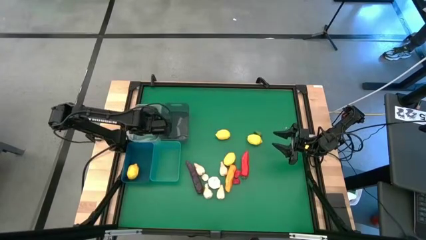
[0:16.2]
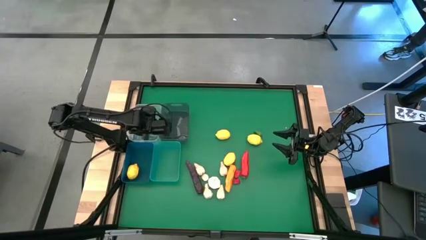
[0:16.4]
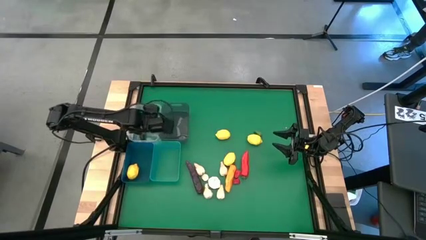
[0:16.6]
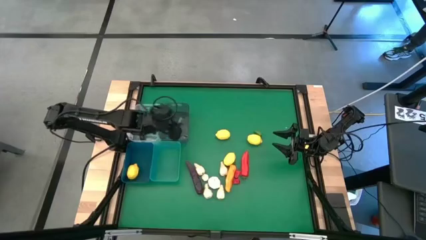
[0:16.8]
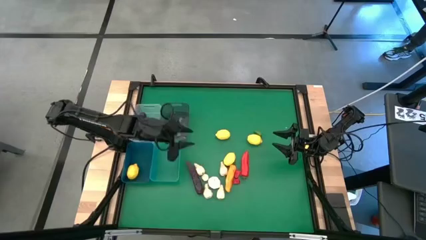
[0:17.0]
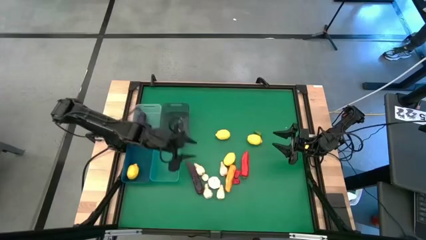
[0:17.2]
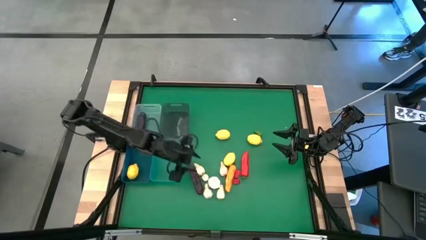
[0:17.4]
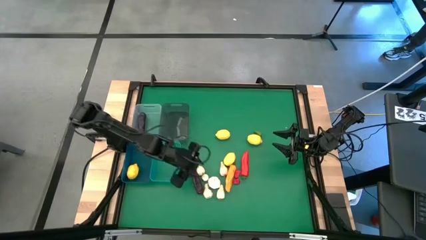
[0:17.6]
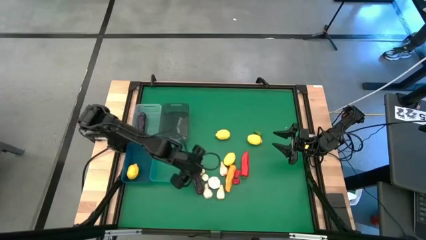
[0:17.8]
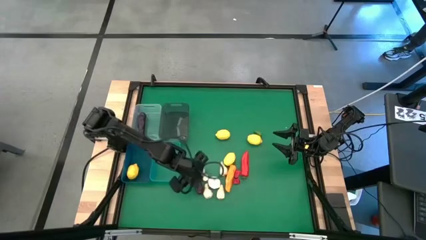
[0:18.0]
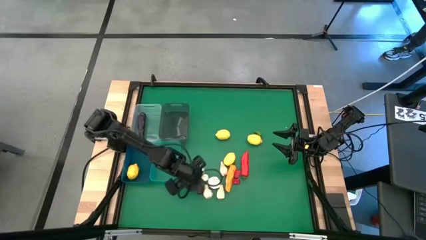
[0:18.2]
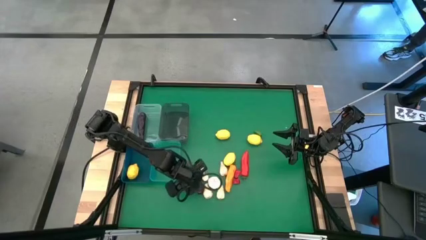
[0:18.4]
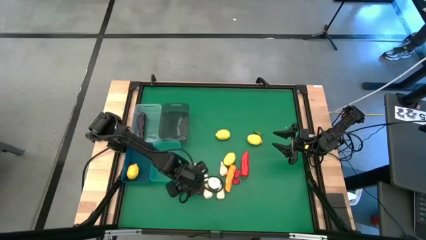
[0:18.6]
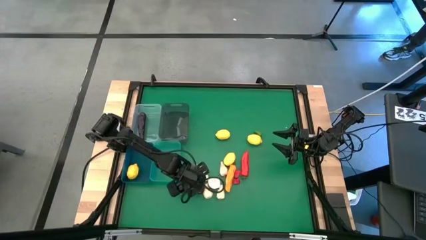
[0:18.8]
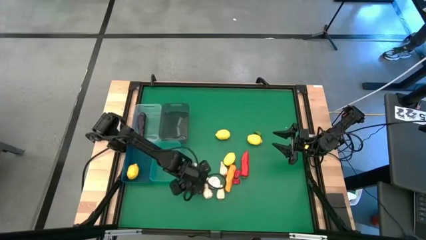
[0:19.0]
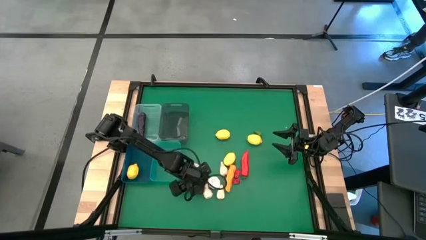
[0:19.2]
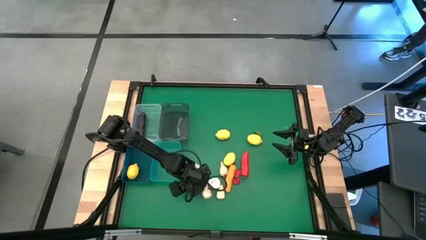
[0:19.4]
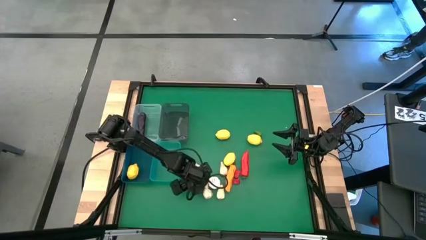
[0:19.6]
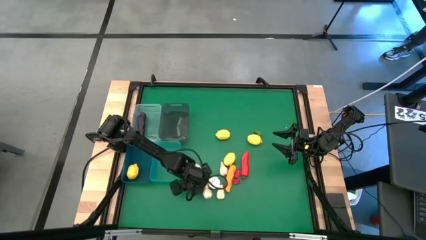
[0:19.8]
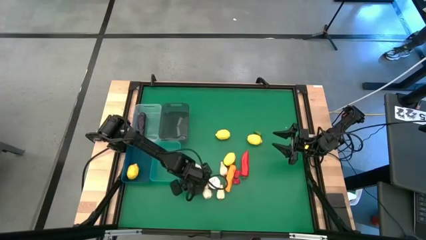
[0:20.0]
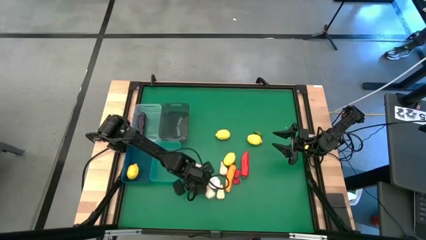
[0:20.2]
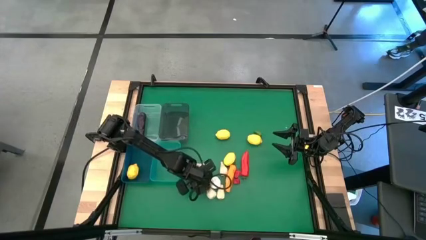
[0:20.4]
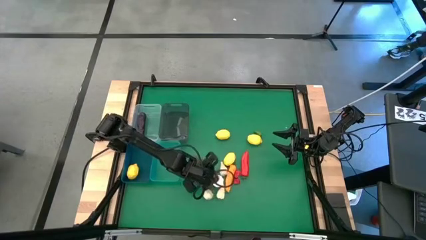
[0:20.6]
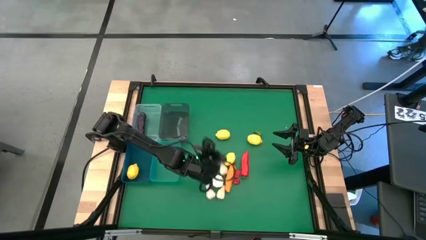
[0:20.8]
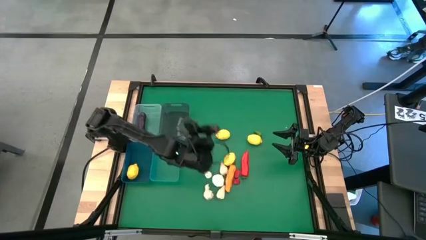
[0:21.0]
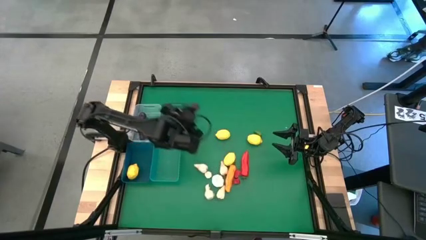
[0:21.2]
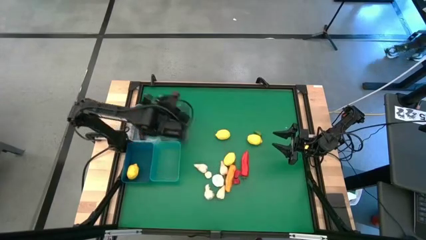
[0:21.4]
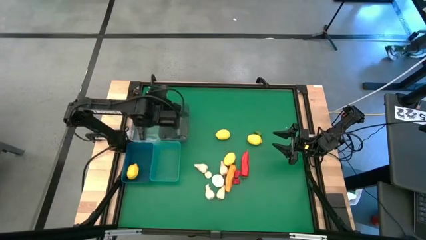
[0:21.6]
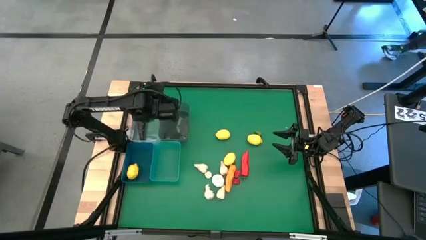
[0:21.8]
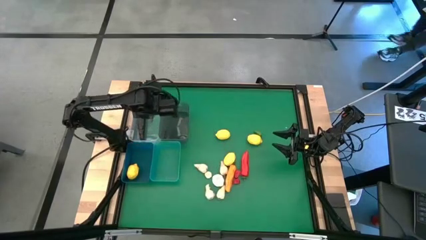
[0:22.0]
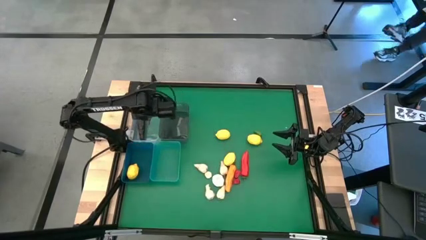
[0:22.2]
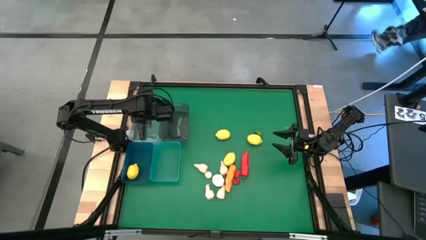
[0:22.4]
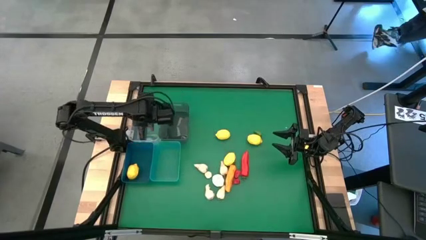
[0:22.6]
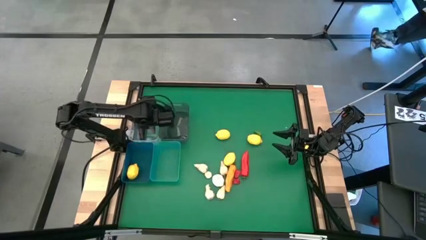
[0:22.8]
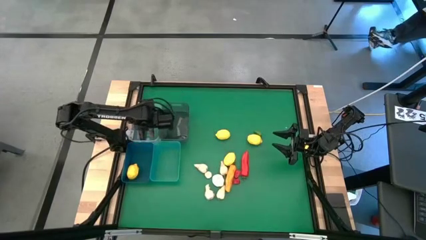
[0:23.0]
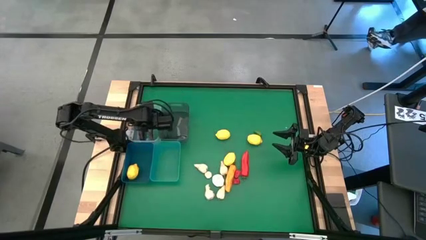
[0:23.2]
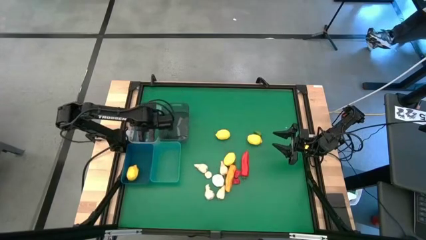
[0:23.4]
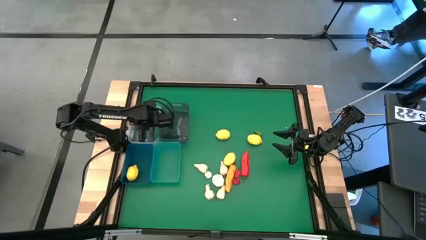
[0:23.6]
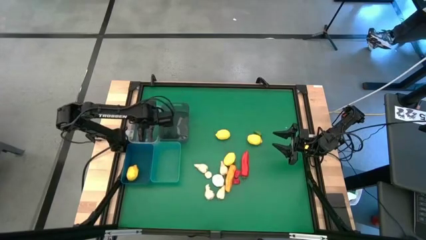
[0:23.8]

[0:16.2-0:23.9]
Task: Sort produce into baskets
Put the purple eggplant into the transparent bin

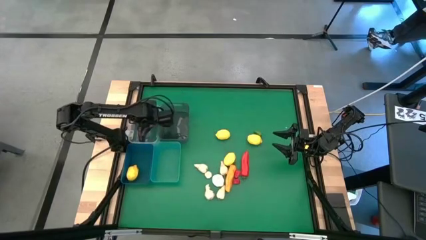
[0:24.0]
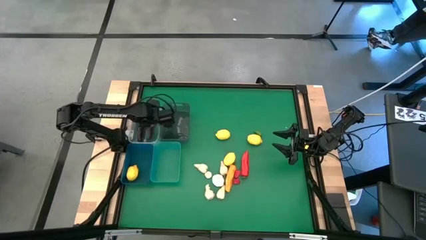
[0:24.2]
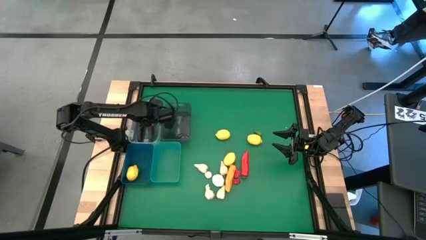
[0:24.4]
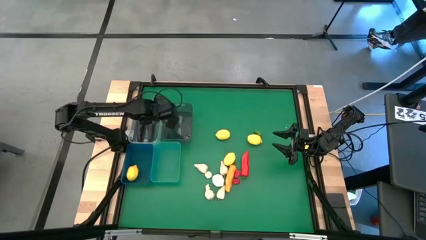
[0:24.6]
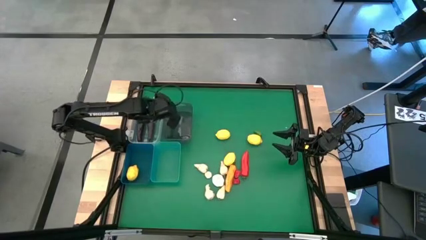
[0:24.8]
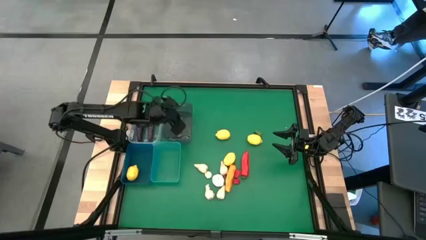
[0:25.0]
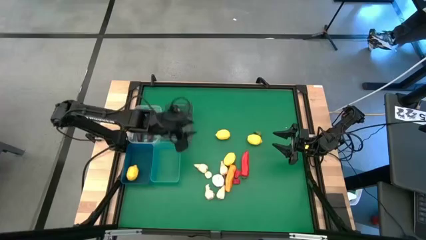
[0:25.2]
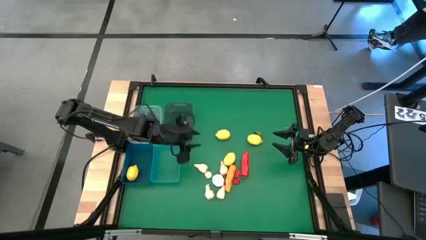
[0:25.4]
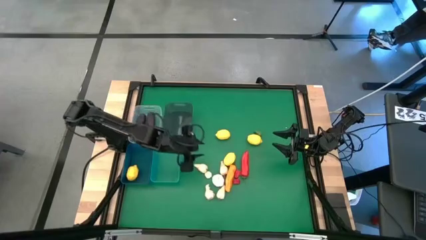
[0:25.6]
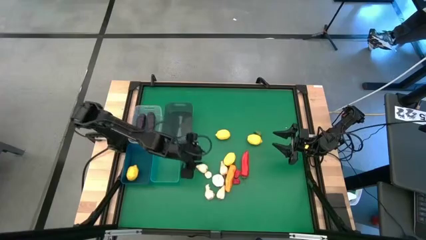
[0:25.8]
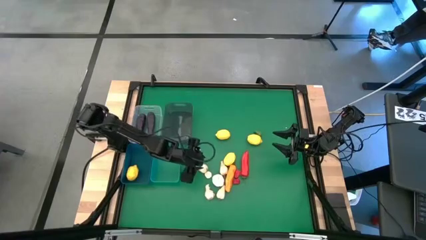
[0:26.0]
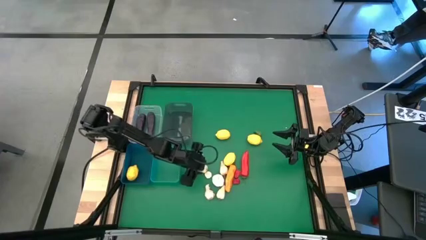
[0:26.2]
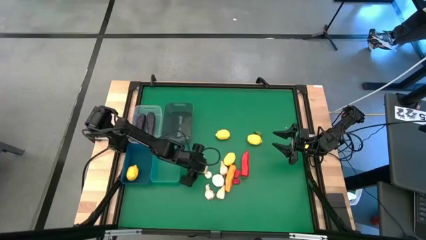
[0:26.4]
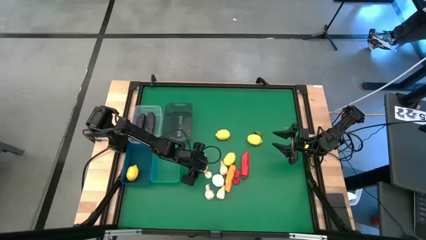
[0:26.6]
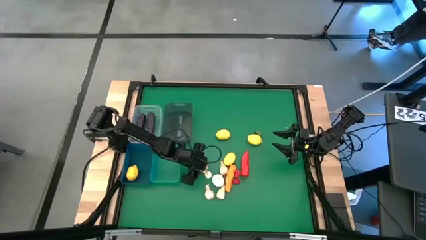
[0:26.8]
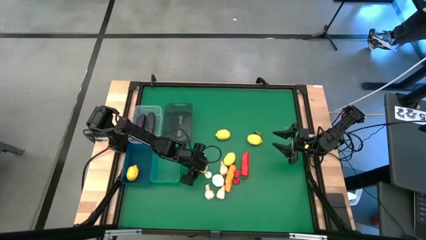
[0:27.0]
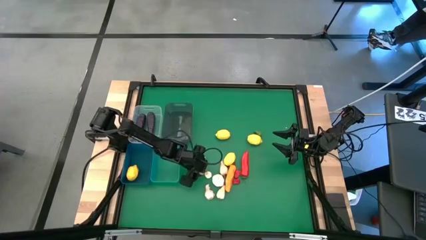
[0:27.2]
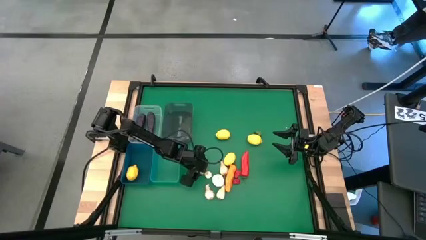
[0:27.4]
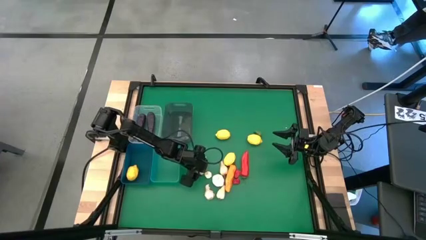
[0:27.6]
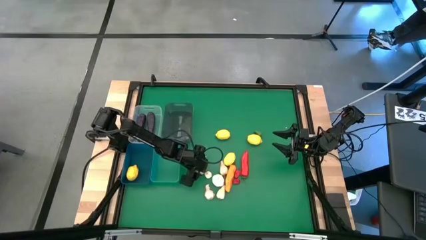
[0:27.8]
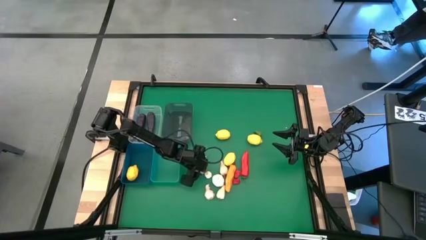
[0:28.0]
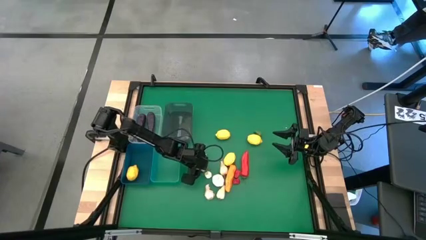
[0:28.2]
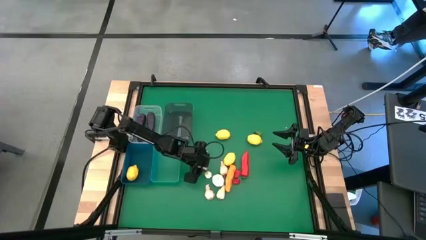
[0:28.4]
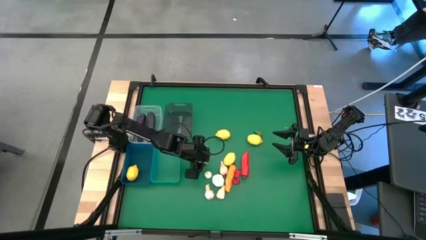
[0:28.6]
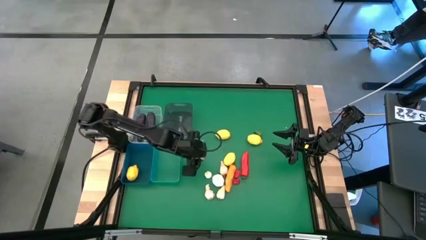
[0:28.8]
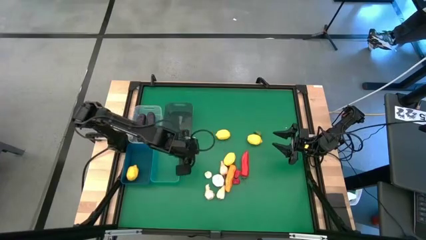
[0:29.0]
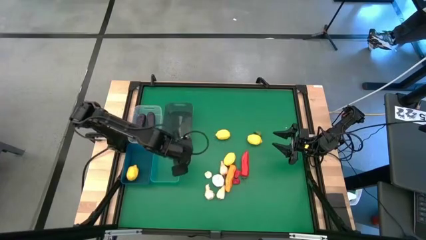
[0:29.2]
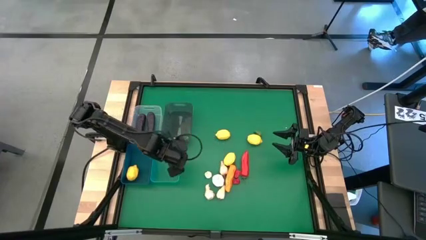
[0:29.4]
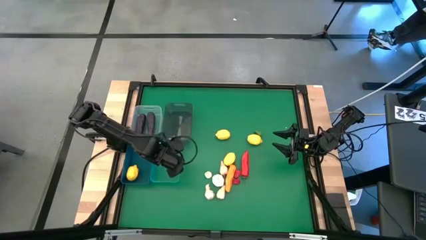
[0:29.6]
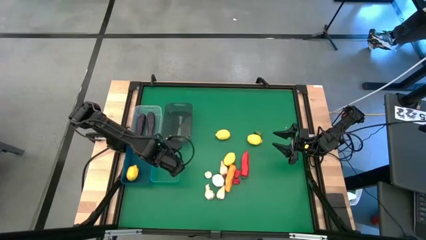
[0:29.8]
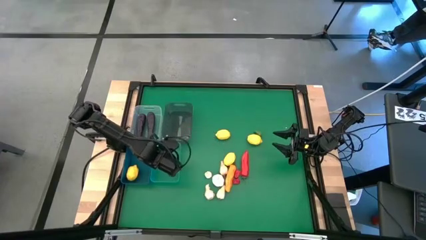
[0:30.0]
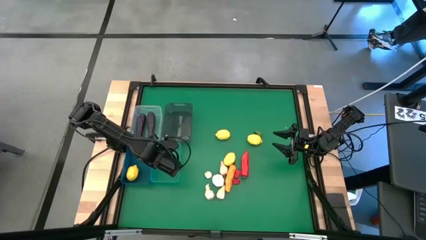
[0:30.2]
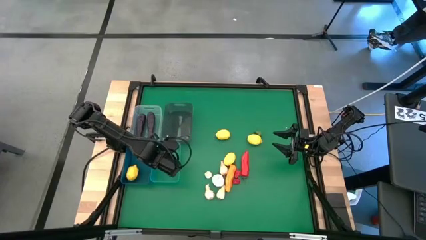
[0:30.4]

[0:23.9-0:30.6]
Put the white garlic into the green bin

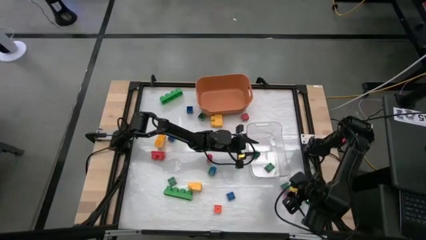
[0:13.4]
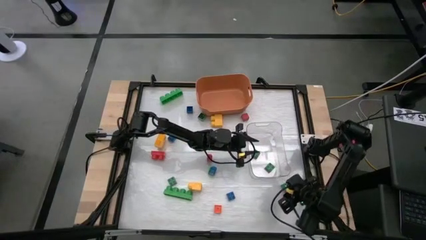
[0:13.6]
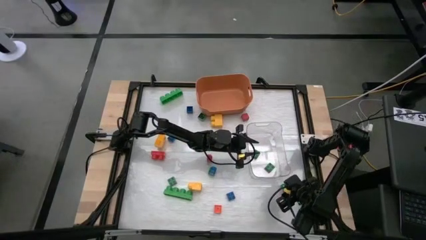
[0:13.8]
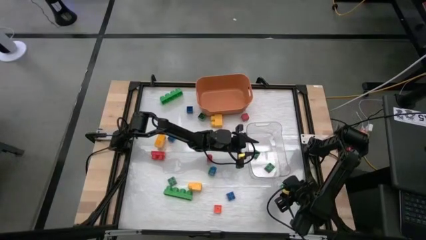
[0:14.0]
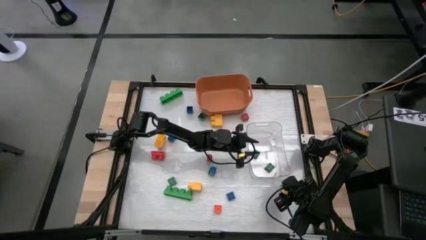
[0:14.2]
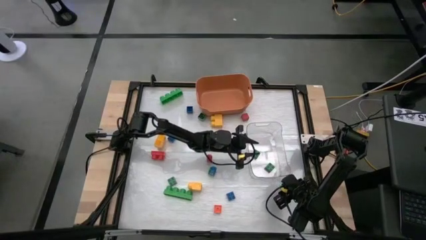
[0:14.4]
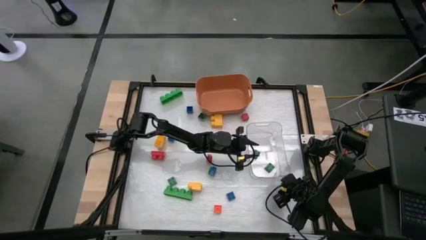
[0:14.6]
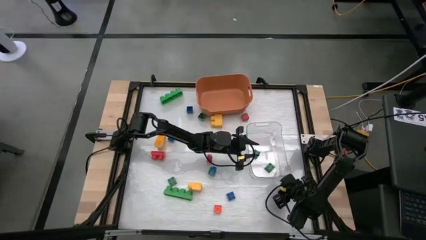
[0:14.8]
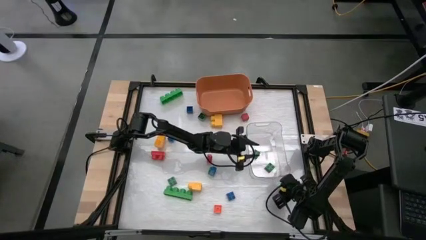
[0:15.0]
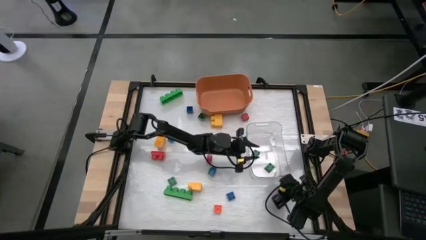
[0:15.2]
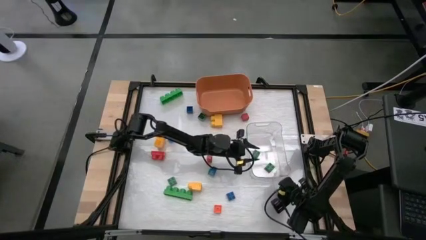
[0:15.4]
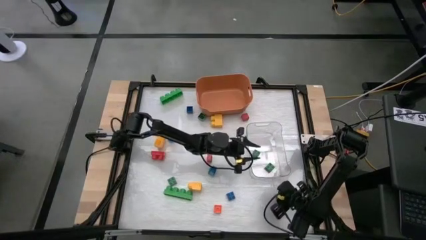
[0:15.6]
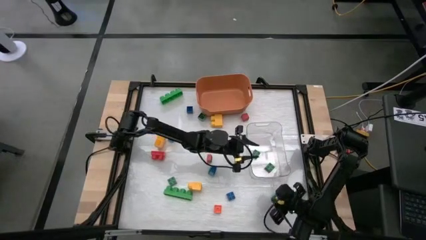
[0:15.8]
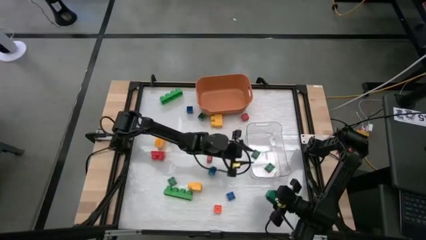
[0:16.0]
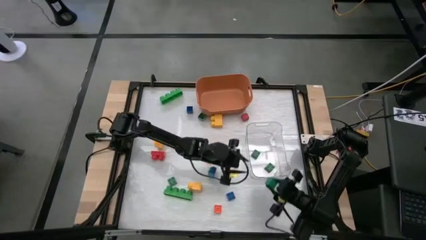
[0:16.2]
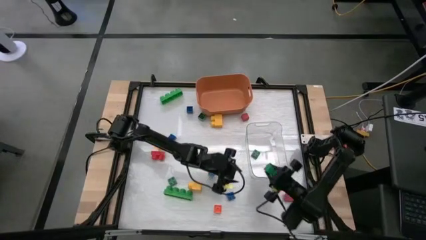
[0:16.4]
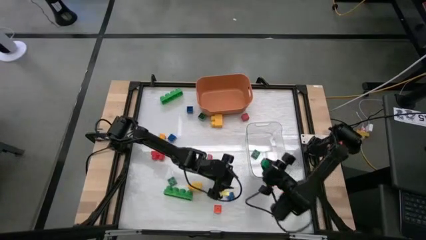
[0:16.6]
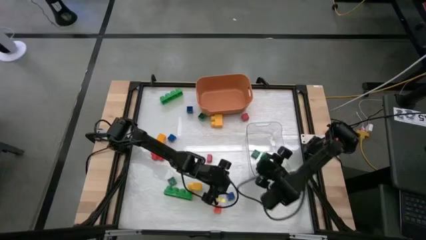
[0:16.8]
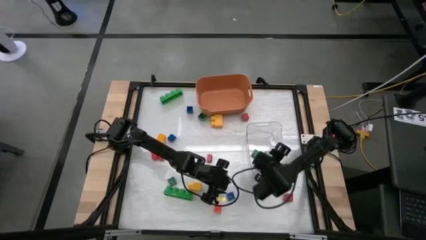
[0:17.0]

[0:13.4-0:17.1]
Task: Sort blocks by size
Put the small green block into the transparent bin
